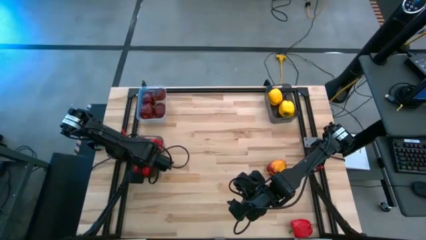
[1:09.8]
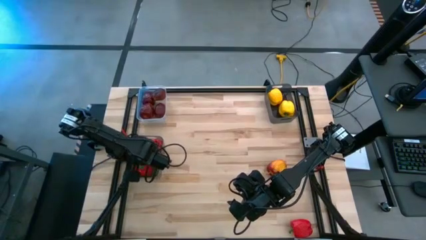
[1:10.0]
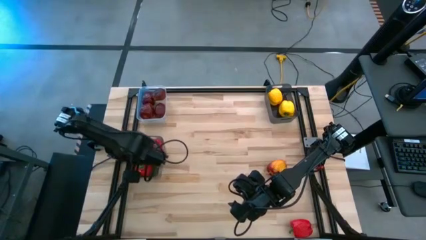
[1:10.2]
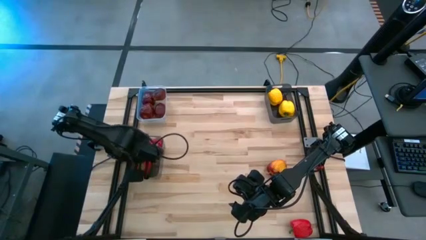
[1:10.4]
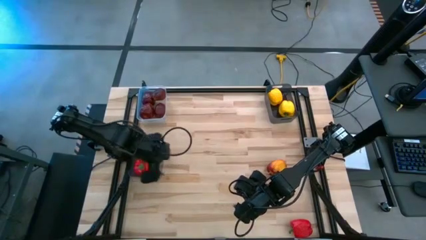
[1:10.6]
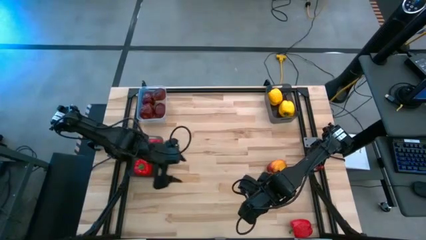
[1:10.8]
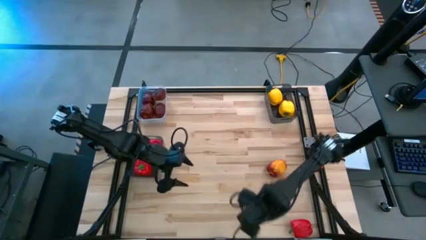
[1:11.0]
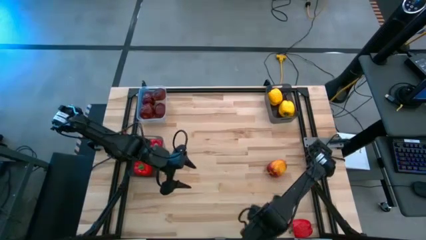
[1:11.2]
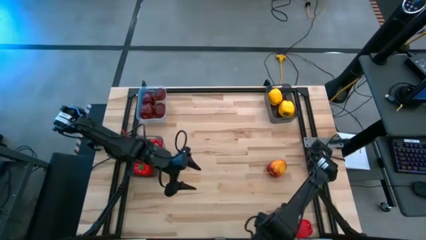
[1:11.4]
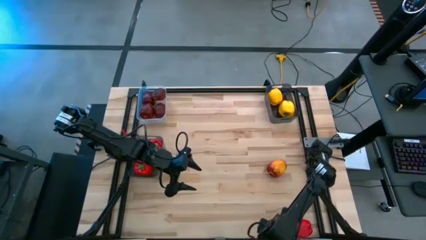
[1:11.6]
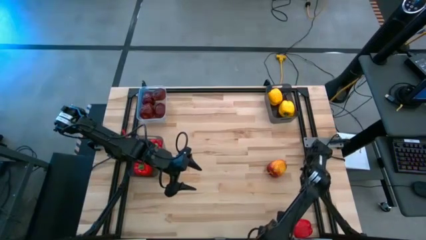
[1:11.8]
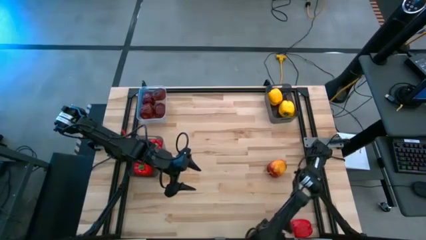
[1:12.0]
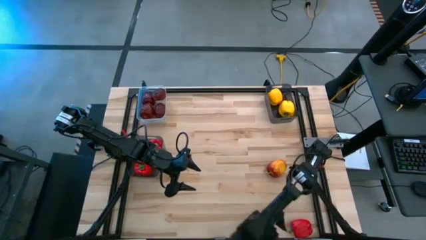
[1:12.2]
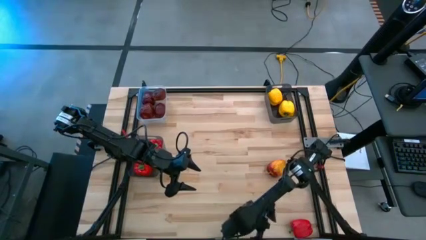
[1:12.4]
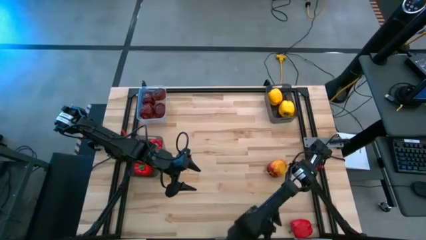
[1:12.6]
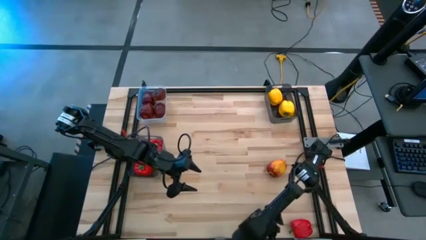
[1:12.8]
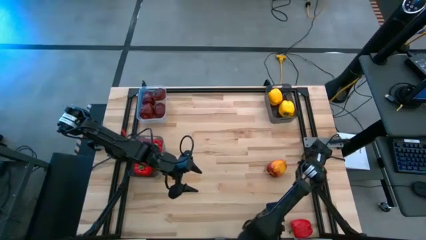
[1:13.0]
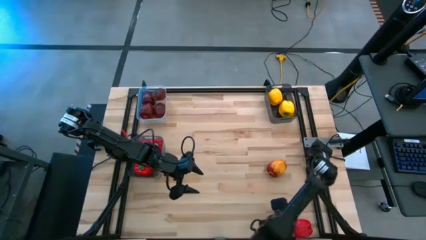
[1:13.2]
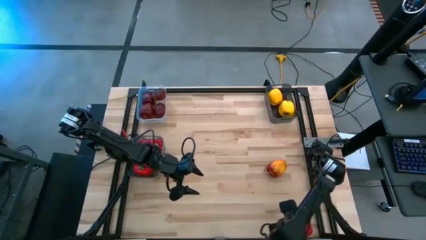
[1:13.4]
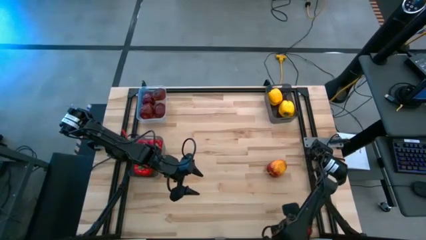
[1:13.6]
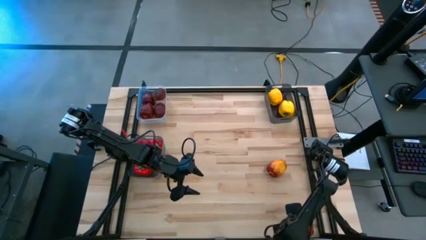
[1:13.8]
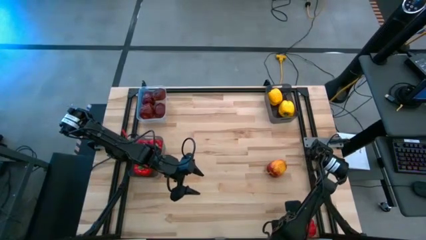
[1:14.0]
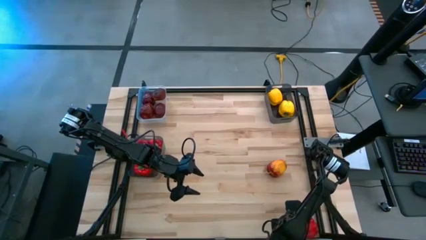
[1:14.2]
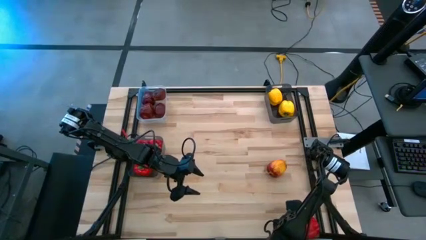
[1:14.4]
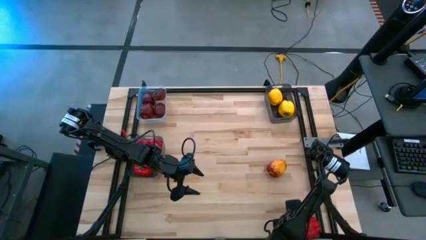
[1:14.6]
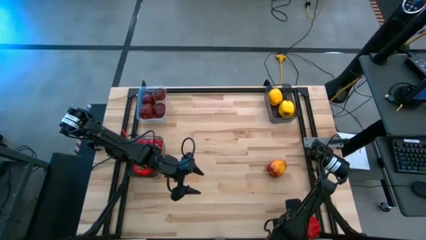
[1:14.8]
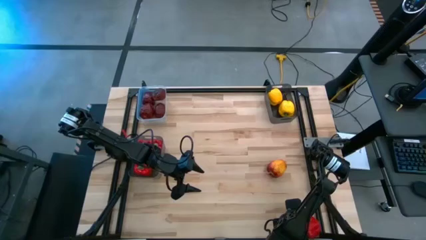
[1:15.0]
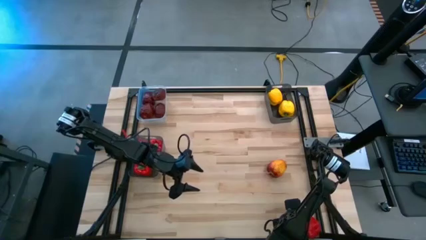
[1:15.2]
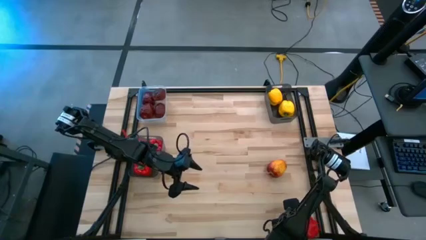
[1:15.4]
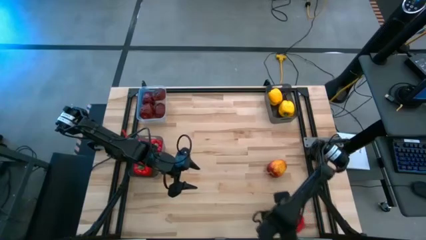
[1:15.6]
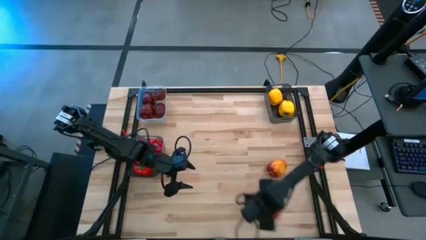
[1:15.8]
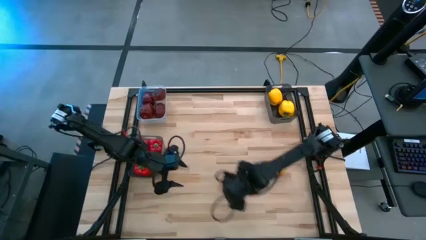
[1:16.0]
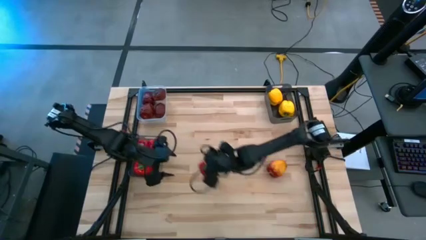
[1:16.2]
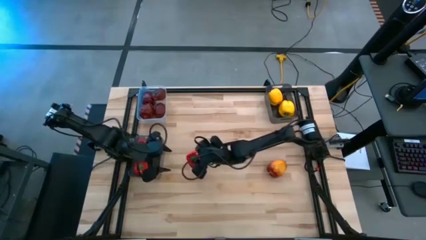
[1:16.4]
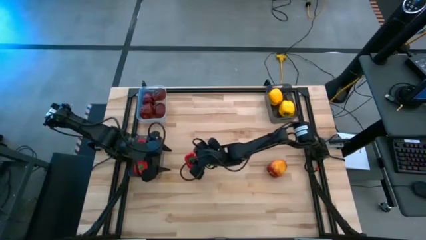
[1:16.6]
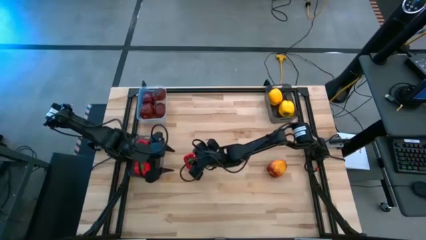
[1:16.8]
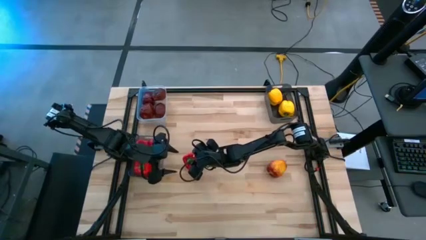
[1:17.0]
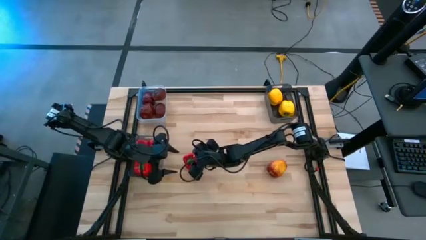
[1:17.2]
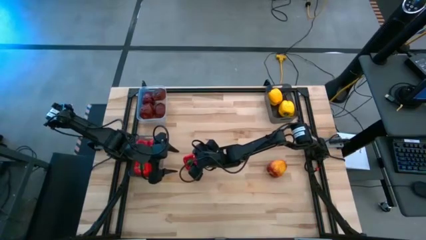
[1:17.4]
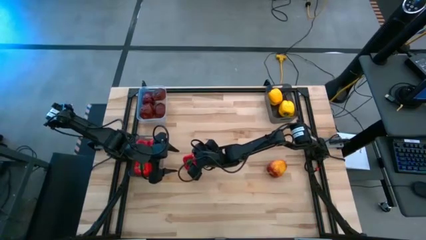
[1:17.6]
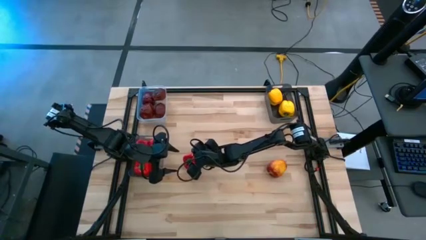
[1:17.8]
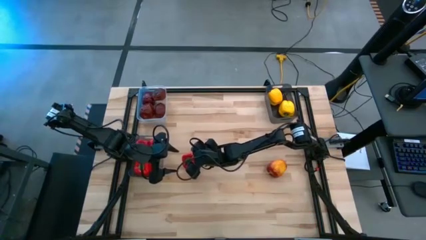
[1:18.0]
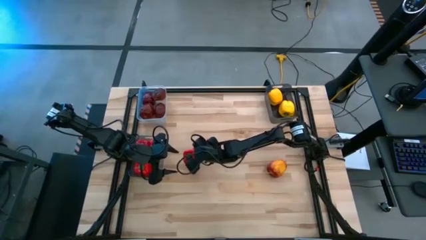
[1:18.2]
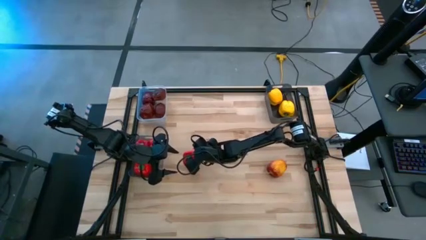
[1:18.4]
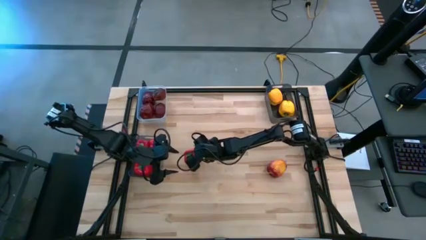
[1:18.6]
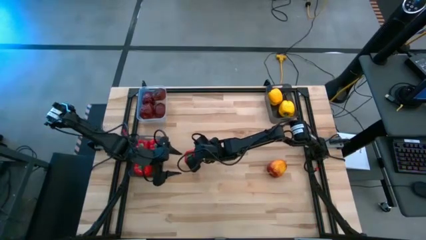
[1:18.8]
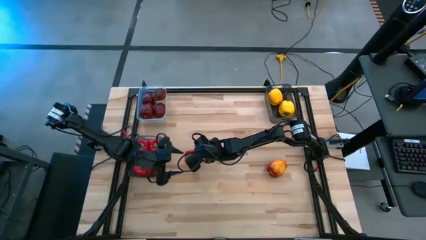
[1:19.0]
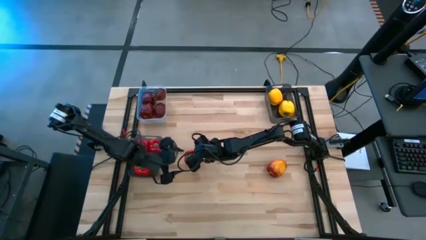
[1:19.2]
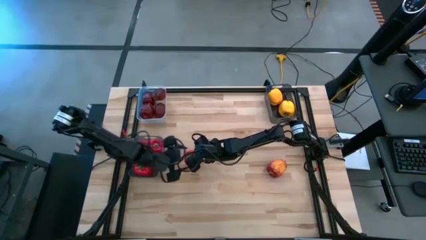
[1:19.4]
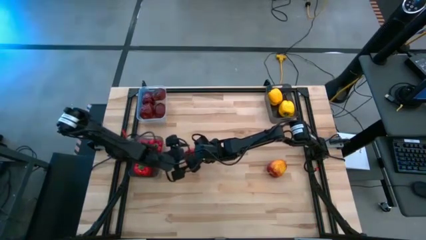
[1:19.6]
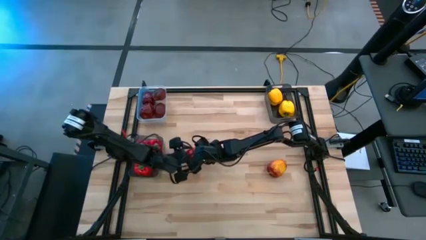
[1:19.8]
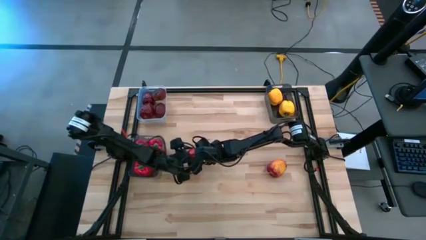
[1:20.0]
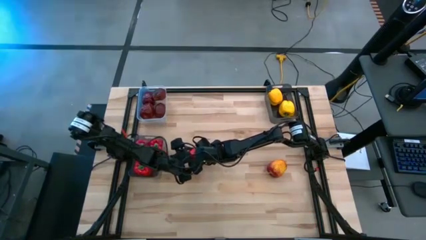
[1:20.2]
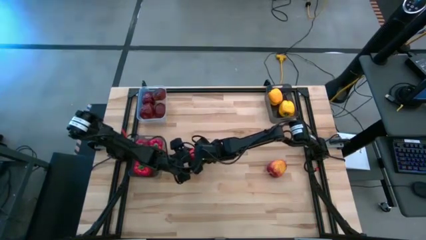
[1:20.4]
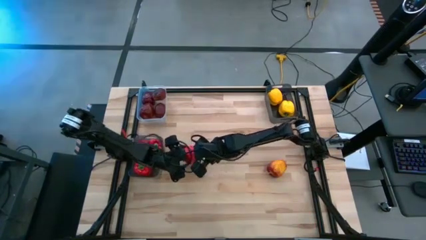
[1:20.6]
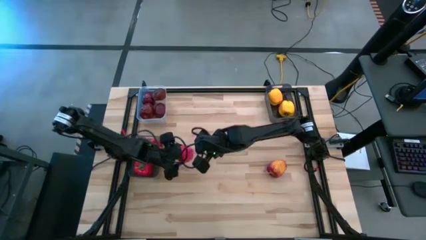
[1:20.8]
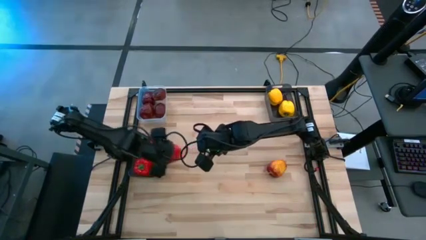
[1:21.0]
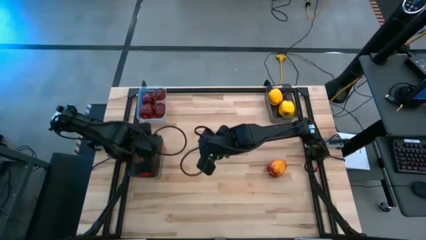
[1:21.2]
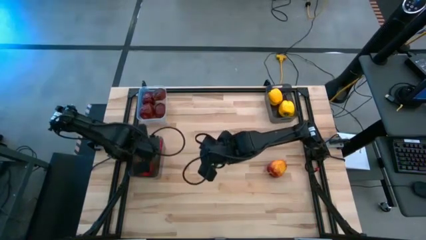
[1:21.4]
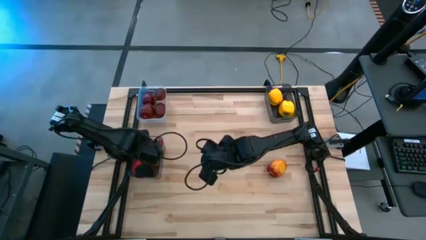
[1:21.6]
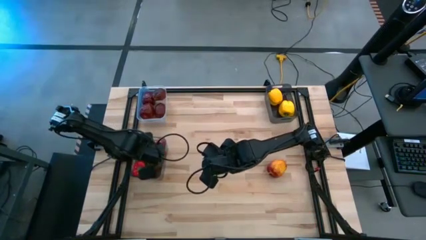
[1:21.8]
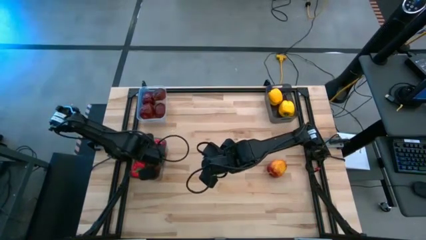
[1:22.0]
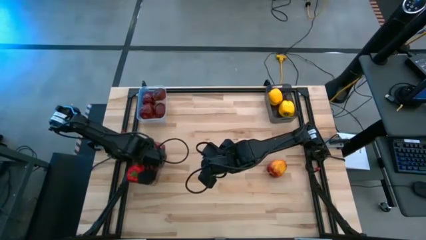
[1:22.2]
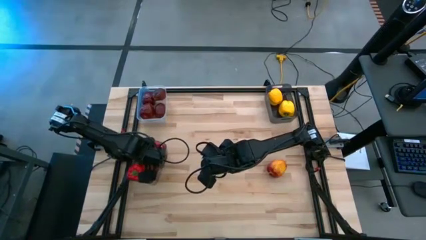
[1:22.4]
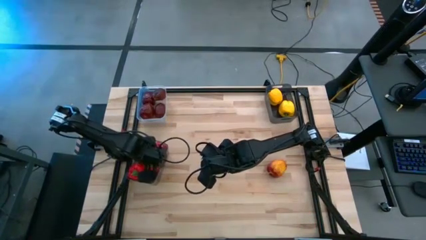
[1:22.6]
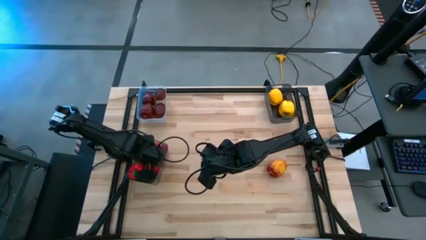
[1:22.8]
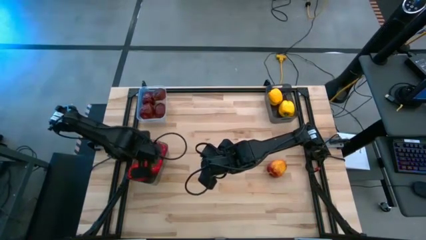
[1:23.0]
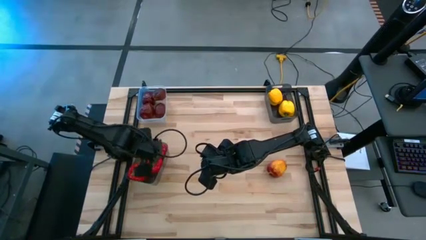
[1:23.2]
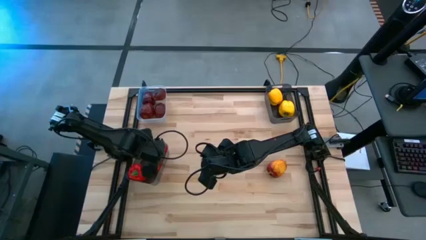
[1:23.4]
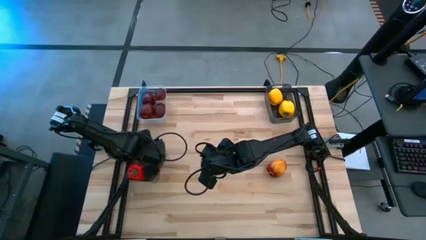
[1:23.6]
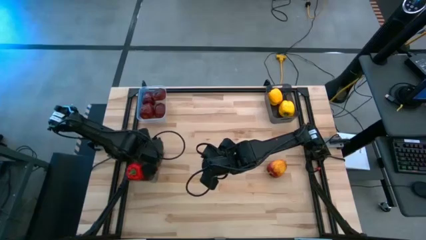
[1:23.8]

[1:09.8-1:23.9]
Task: Sort produce into baskets
Put the red bell pepper into the bottom black bin

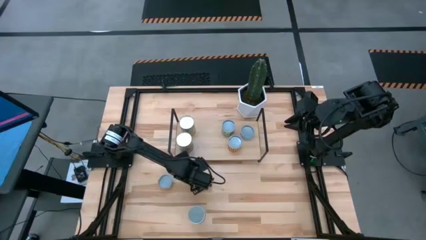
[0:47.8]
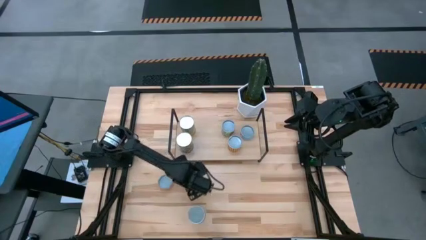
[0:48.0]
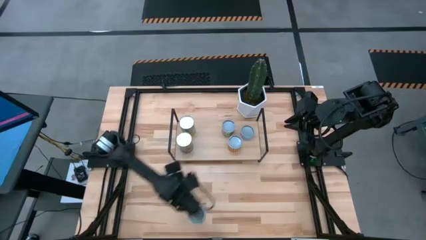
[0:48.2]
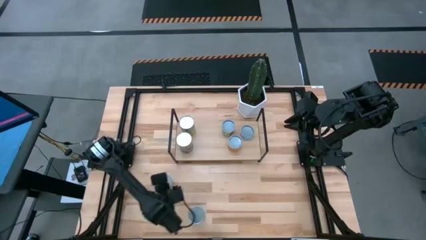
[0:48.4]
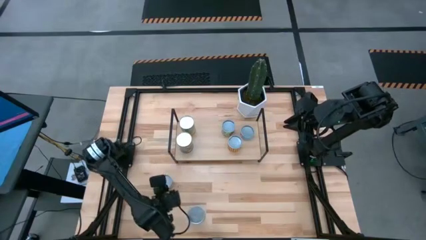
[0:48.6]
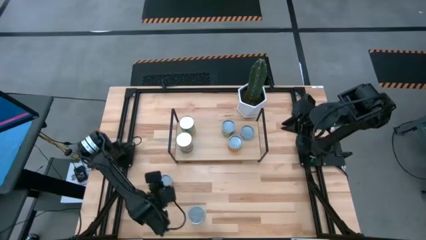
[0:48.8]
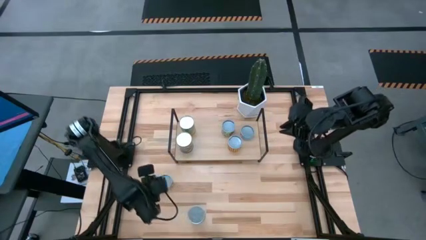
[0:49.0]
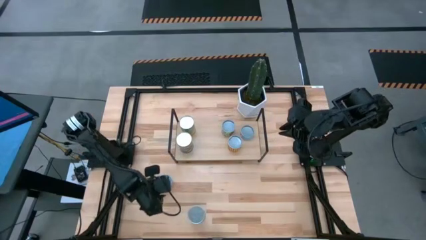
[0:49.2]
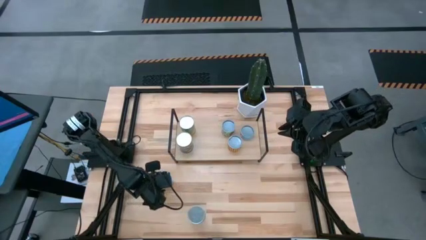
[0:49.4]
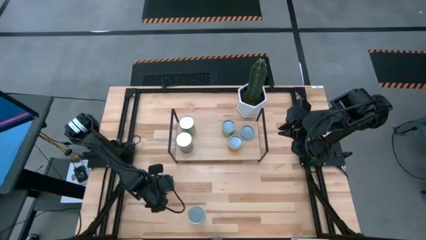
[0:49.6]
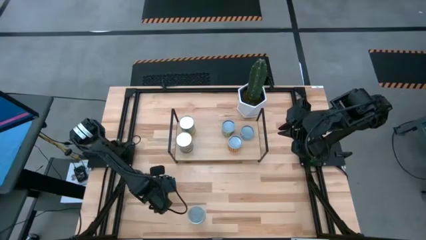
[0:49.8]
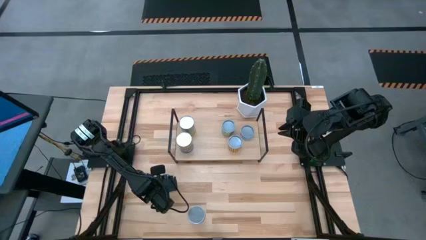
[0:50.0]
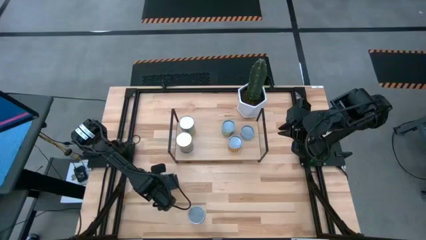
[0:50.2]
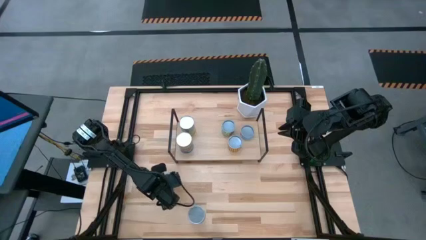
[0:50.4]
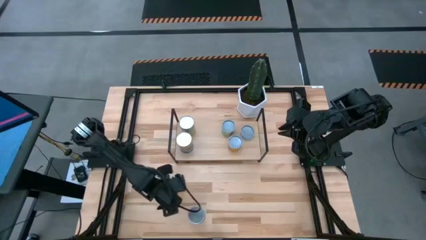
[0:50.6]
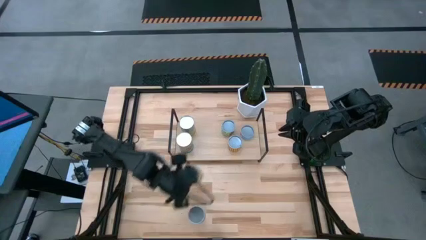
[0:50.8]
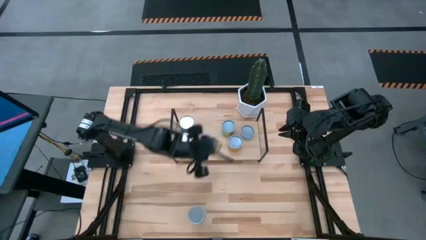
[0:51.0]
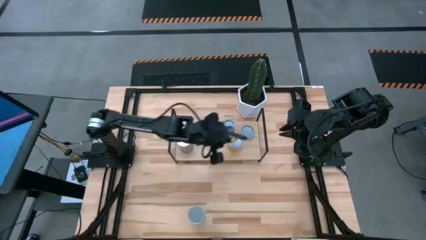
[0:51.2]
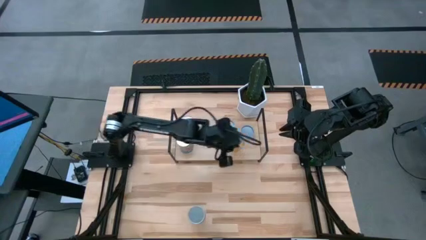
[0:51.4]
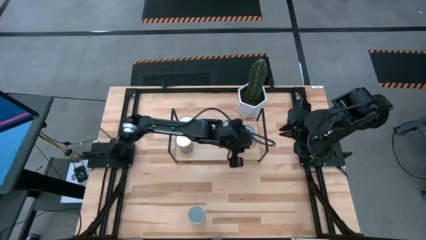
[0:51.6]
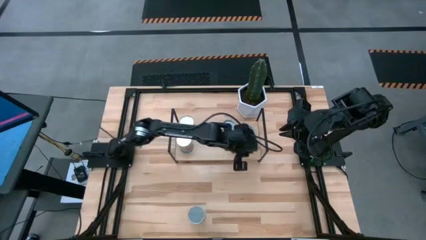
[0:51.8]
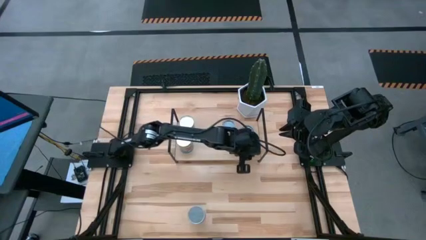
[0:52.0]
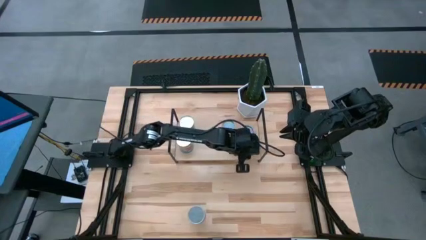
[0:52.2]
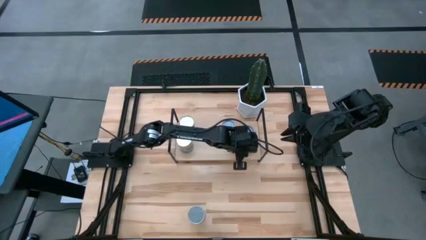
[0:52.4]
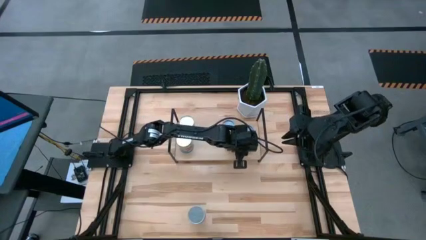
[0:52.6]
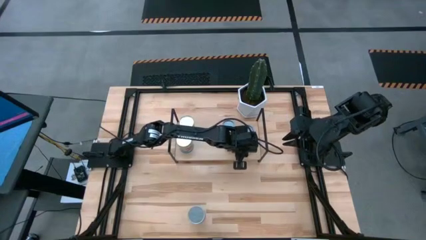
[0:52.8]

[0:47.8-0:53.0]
Task: Pick and place cans onto a shelf
Put the small mushroom can on the shelf aligned with the other small canned salmon
